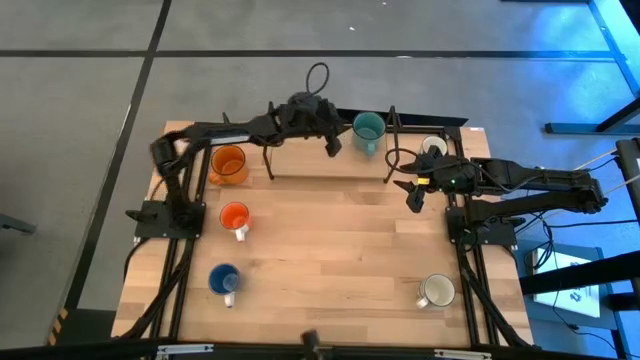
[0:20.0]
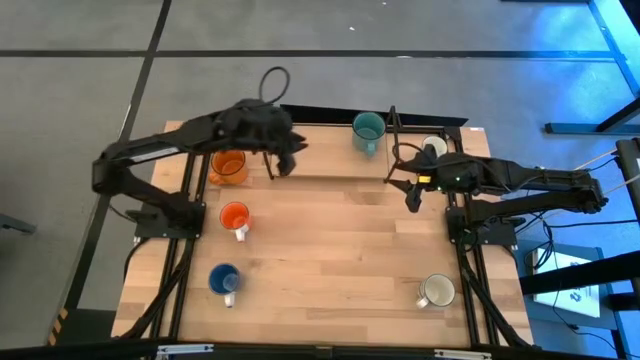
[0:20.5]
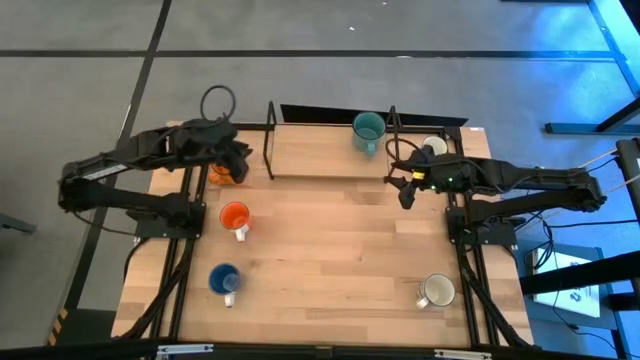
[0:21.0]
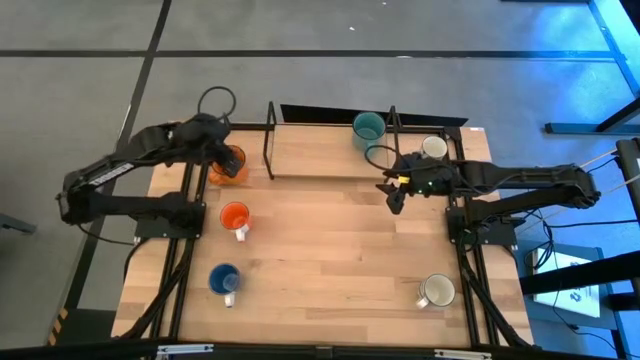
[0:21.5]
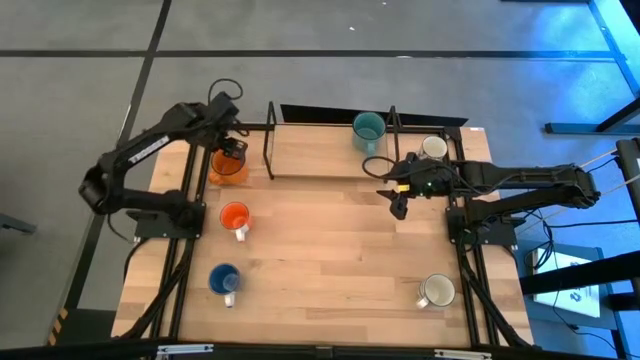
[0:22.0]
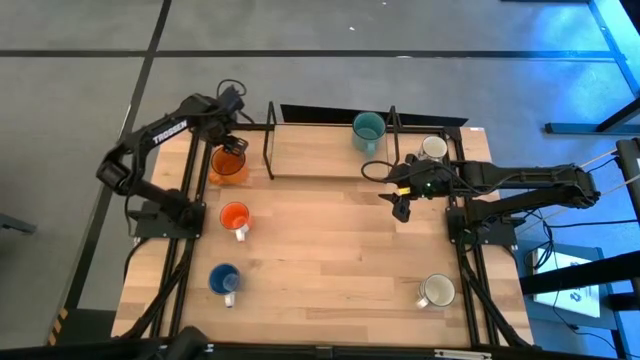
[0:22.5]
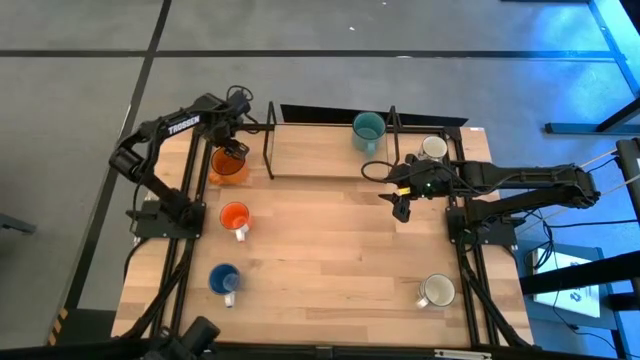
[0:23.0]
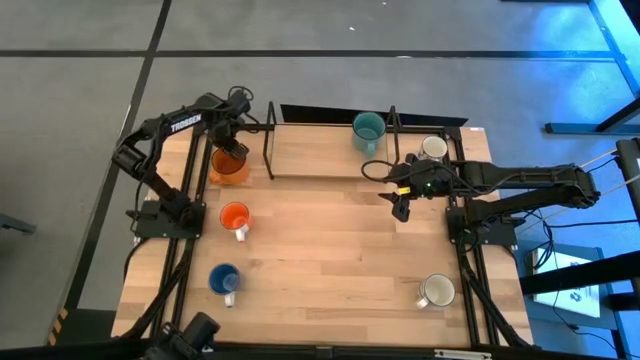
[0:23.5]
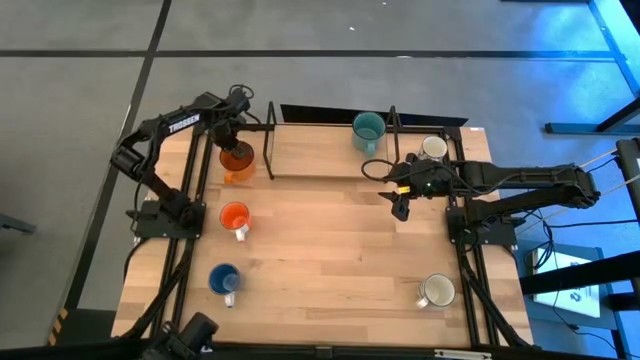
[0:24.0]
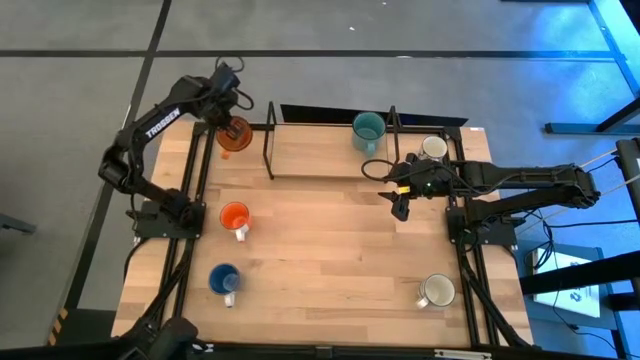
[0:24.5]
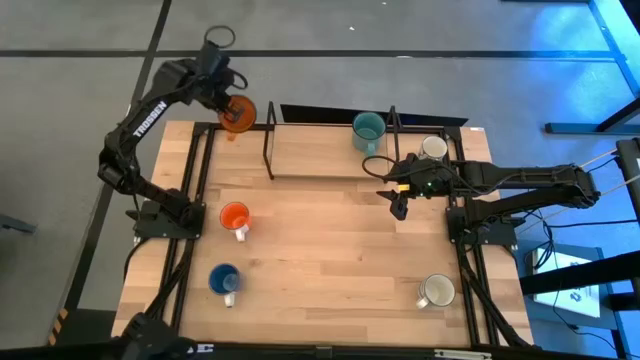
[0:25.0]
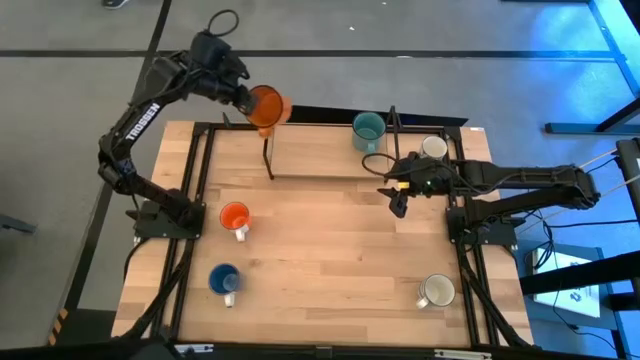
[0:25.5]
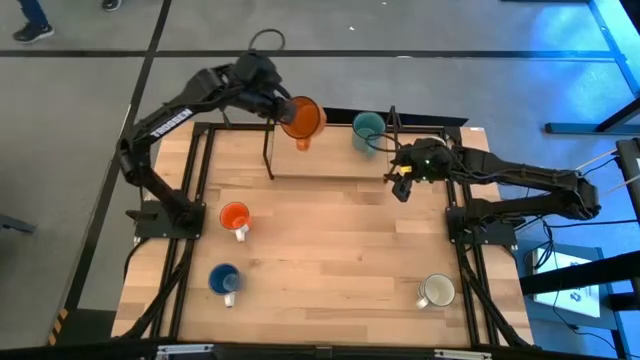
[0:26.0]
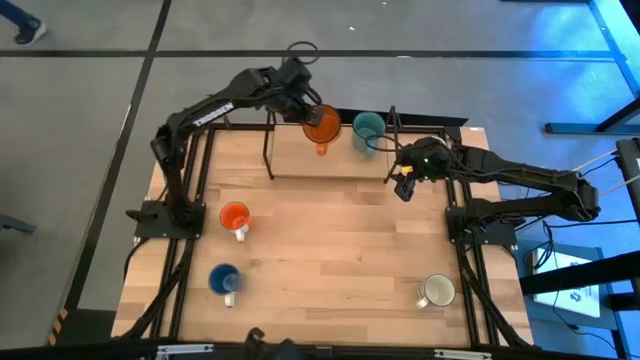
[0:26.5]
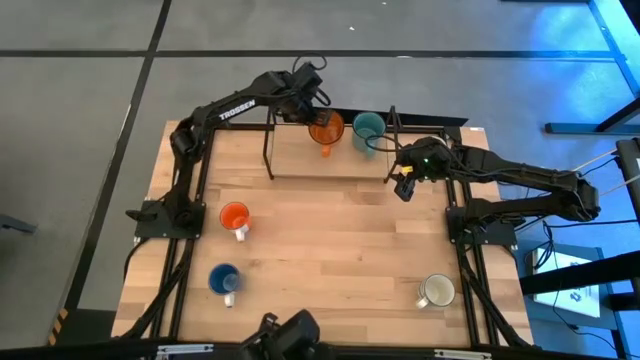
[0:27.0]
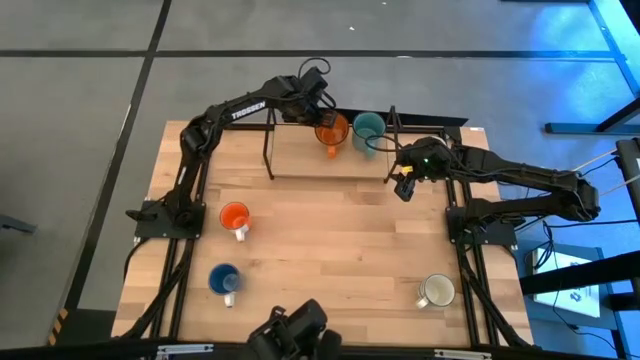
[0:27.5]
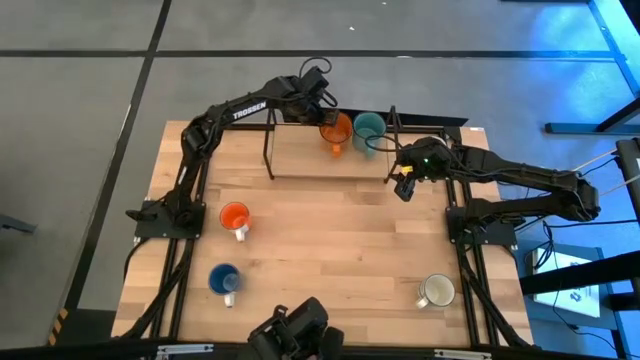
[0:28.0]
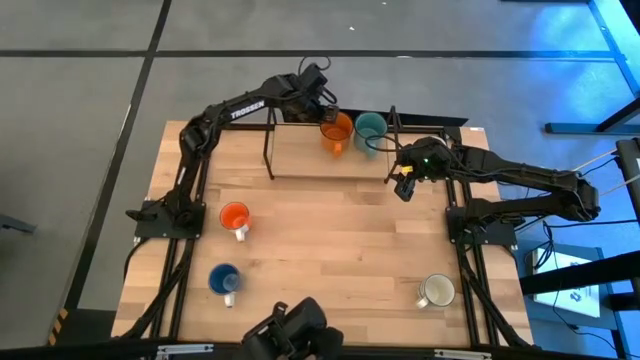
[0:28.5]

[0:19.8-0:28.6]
Task: Place coffee mugs
Put the orange mug on the shelf

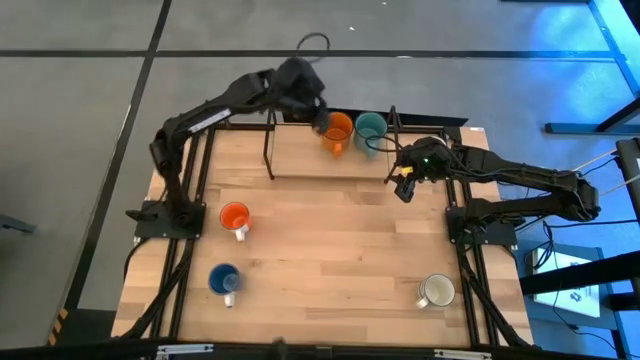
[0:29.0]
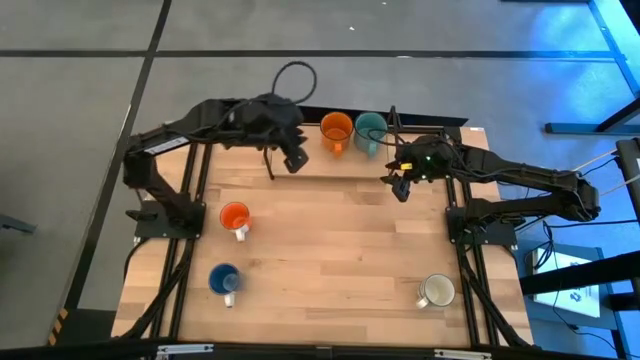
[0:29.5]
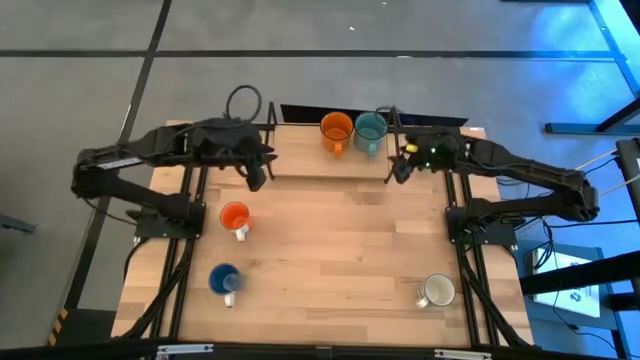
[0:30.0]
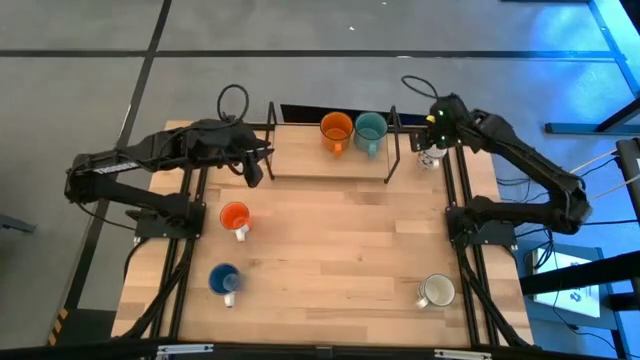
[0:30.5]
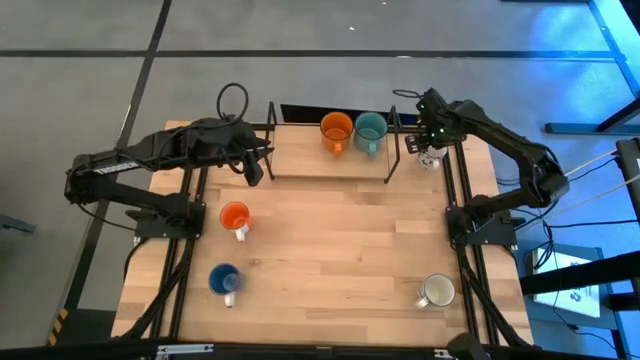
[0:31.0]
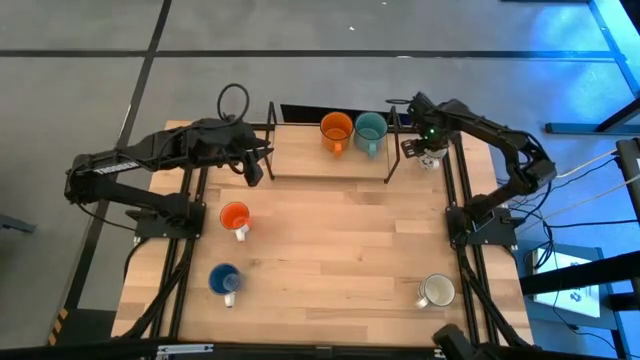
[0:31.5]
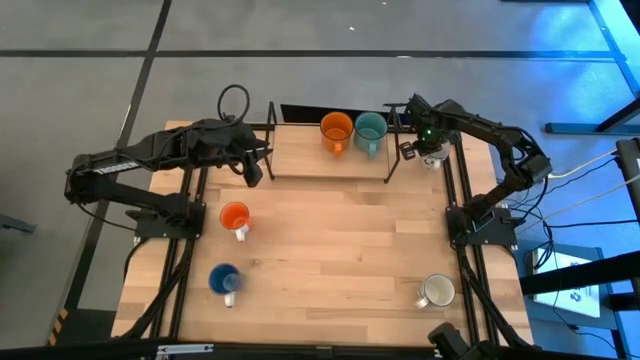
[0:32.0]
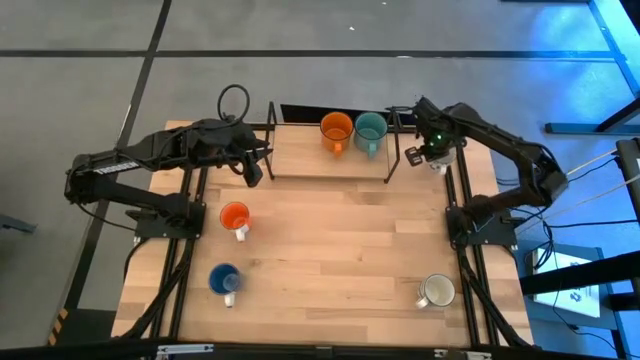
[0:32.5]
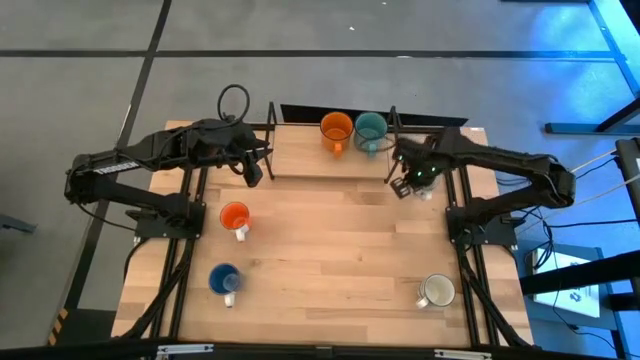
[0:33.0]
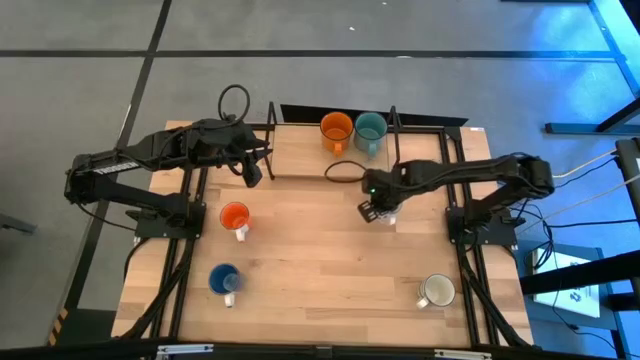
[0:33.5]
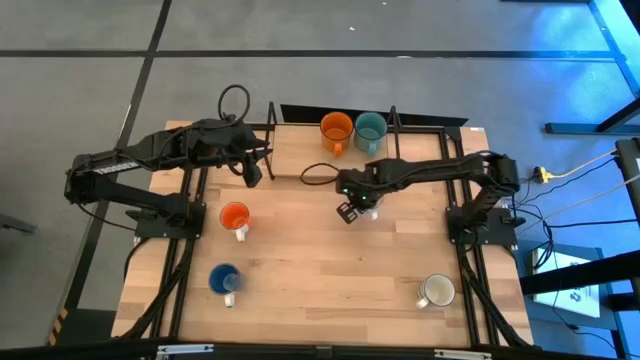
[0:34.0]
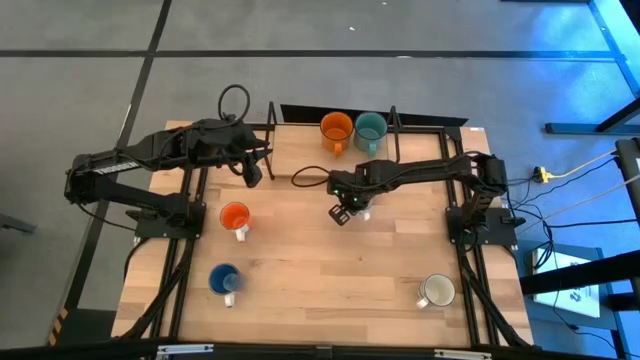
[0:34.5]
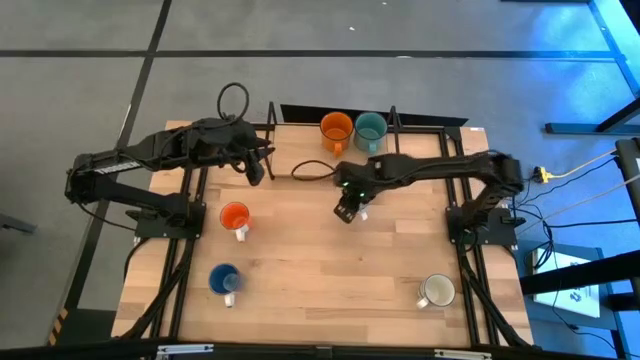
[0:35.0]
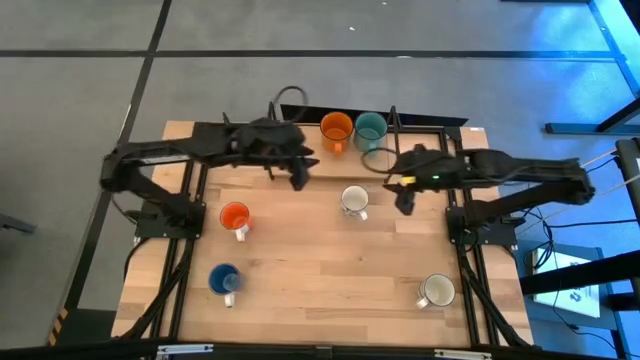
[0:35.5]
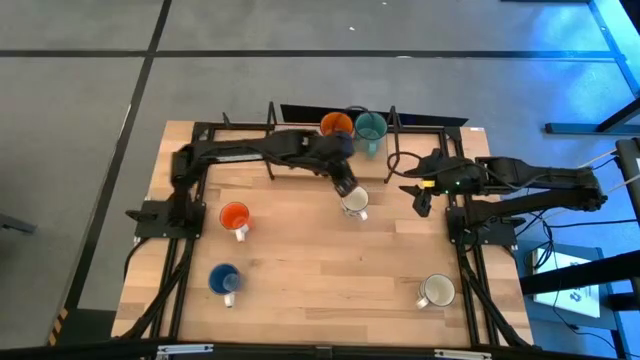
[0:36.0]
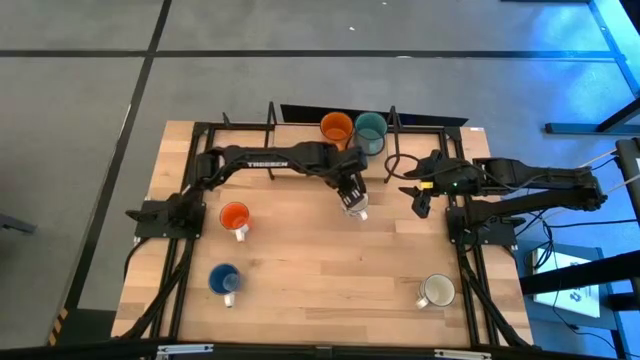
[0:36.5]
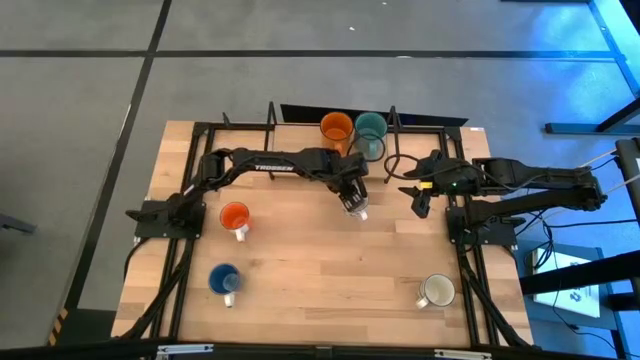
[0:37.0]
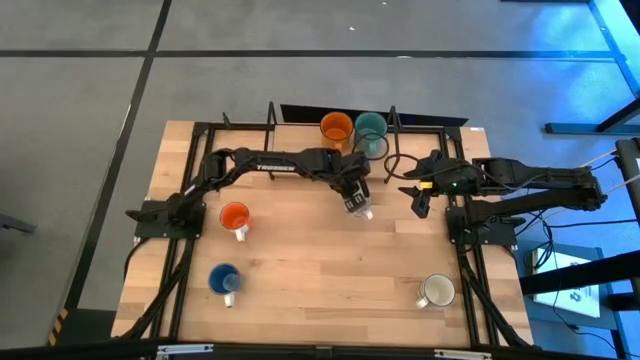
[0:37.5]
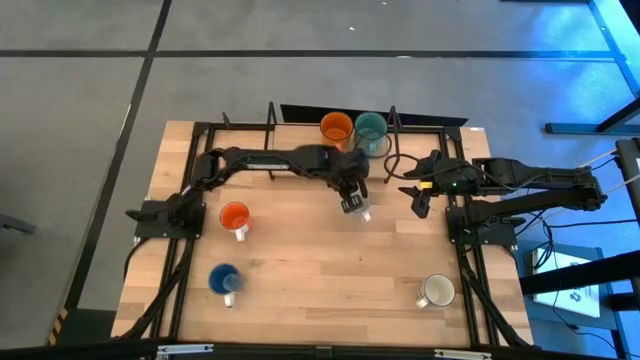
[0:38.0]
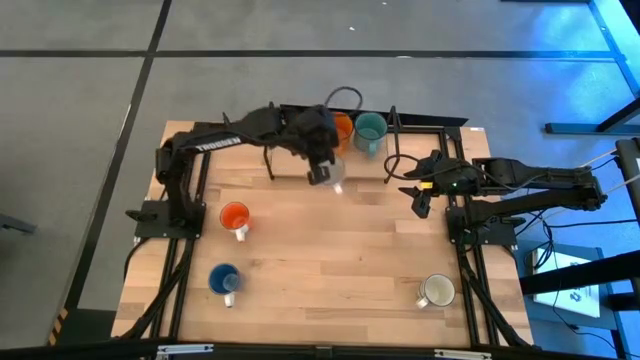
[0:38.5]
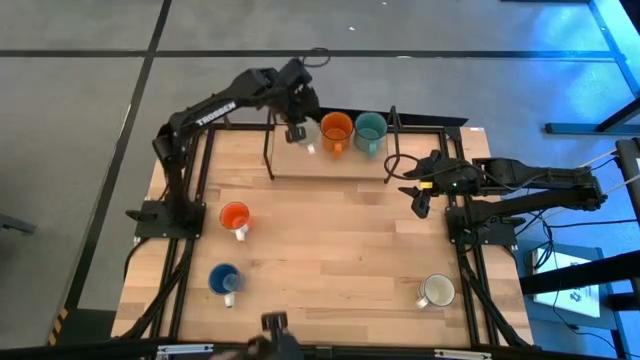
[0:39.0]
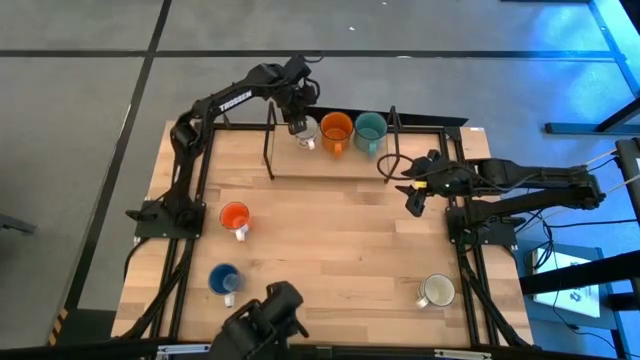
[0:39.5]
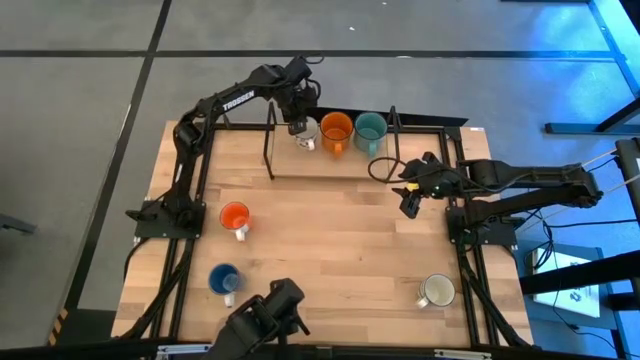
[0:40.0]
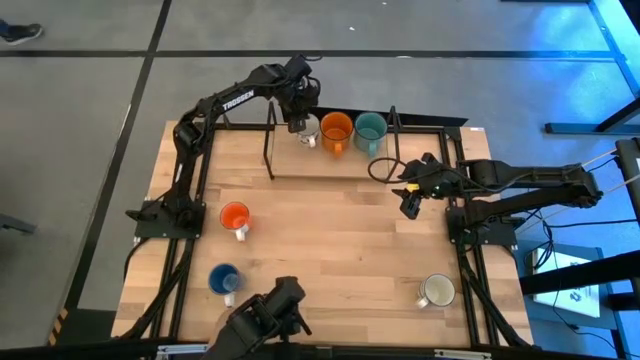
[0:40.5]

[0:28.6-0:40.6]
Put the top white patterned mug on the shelf
